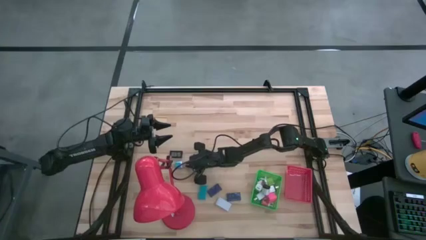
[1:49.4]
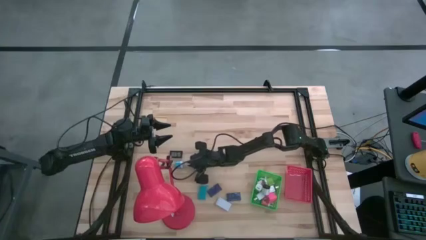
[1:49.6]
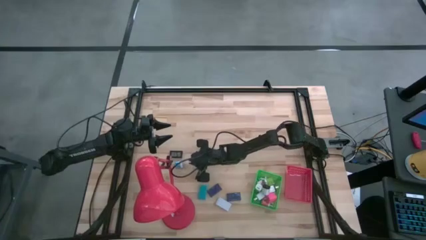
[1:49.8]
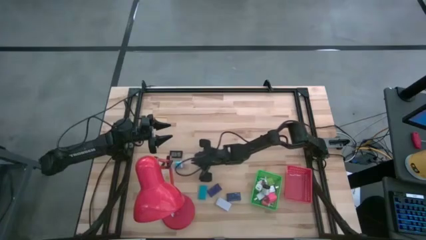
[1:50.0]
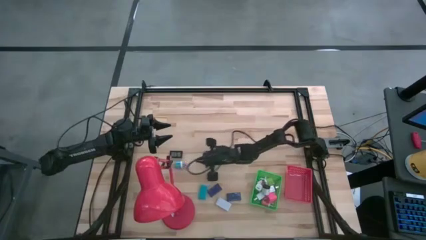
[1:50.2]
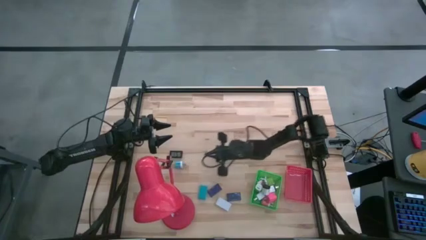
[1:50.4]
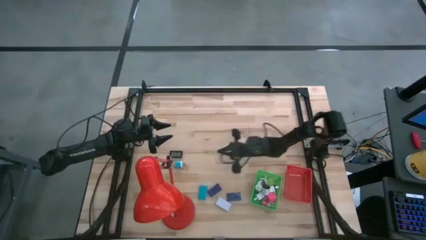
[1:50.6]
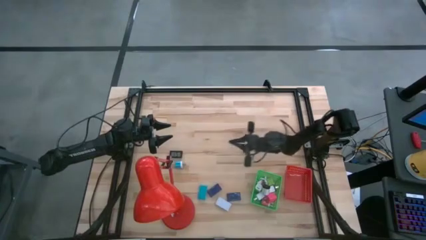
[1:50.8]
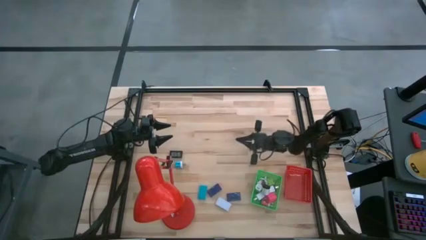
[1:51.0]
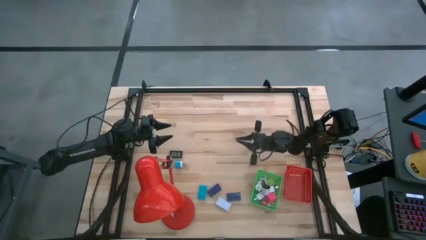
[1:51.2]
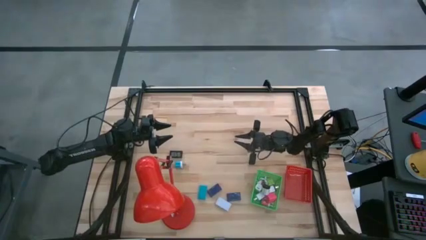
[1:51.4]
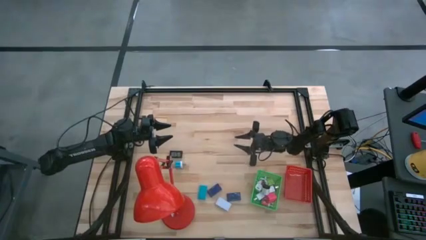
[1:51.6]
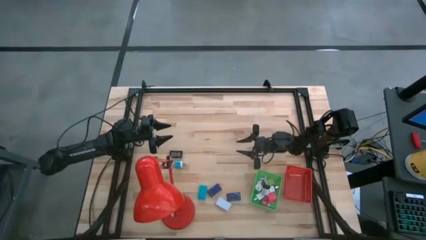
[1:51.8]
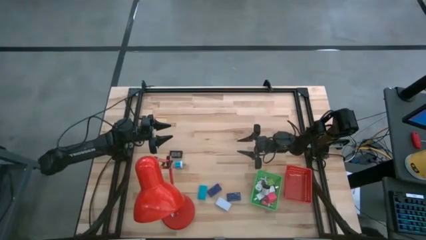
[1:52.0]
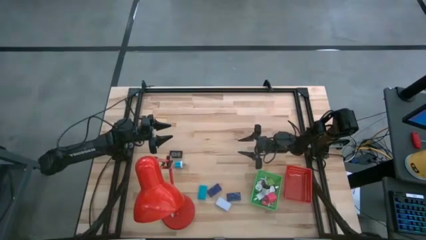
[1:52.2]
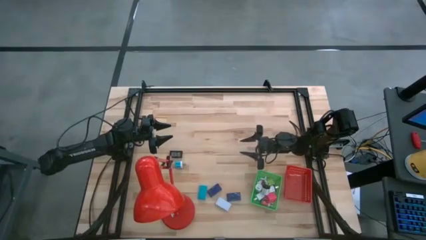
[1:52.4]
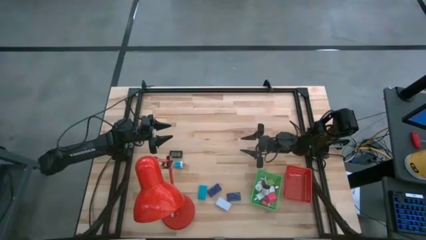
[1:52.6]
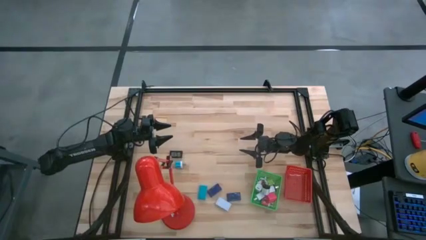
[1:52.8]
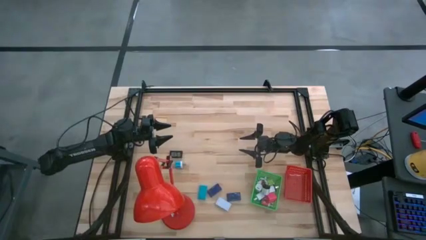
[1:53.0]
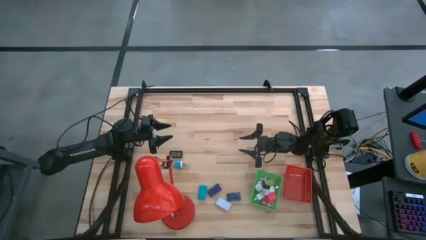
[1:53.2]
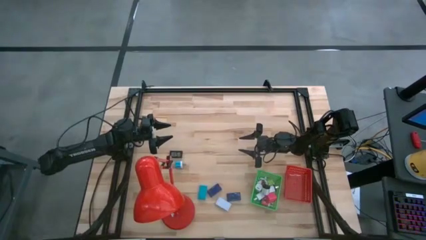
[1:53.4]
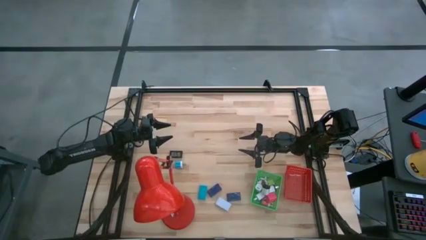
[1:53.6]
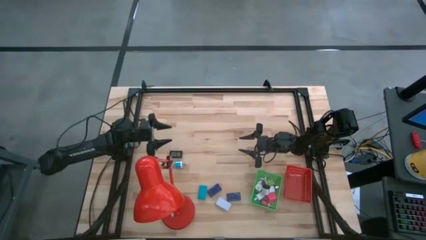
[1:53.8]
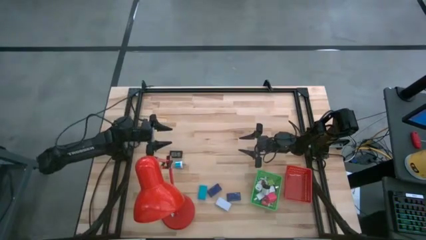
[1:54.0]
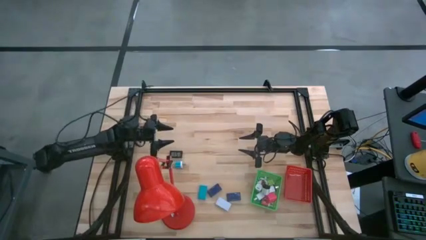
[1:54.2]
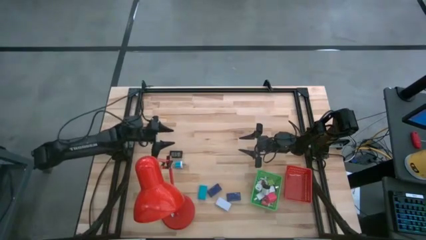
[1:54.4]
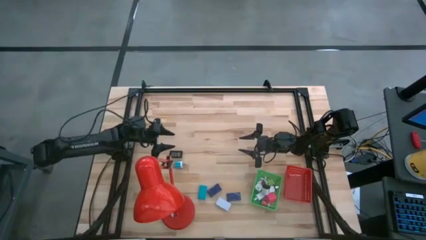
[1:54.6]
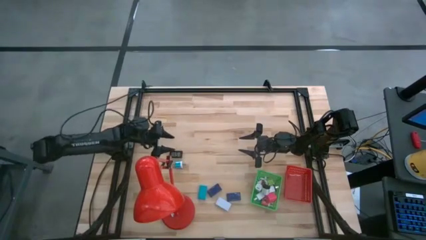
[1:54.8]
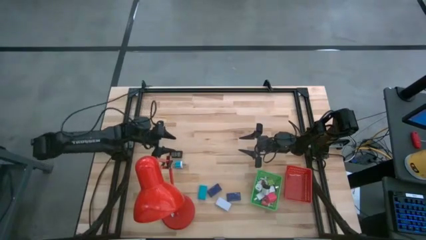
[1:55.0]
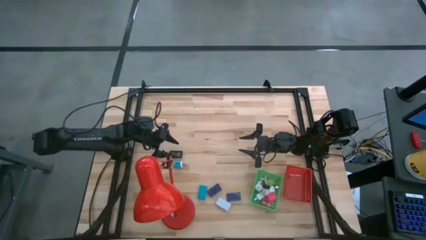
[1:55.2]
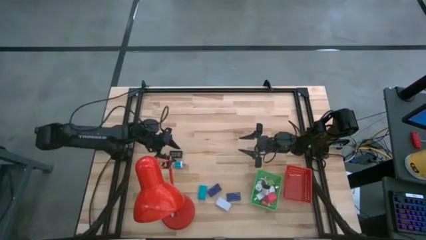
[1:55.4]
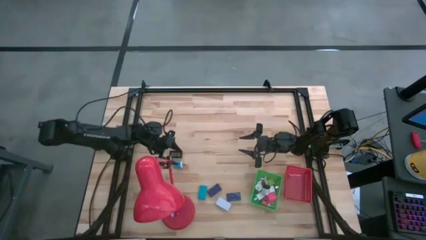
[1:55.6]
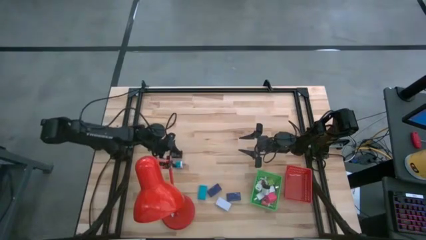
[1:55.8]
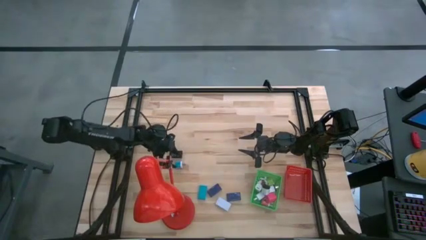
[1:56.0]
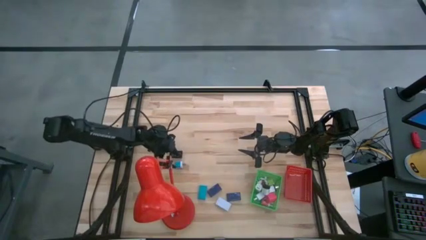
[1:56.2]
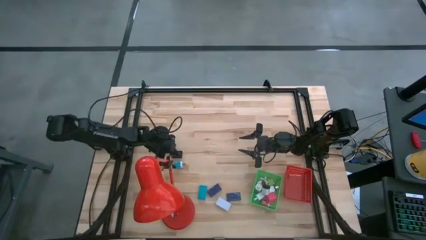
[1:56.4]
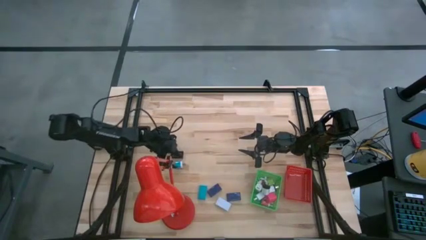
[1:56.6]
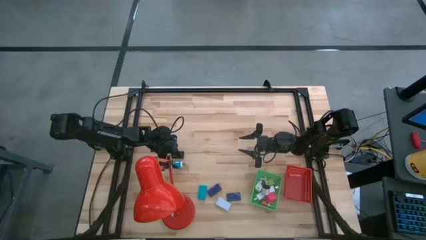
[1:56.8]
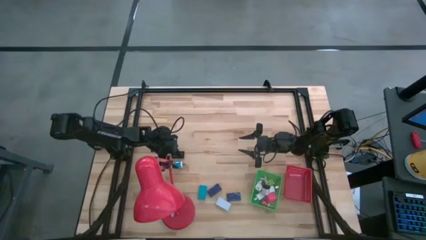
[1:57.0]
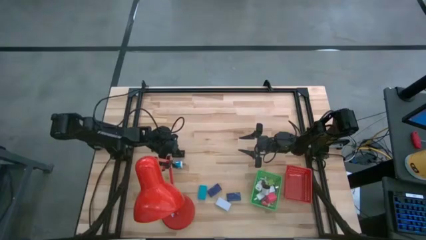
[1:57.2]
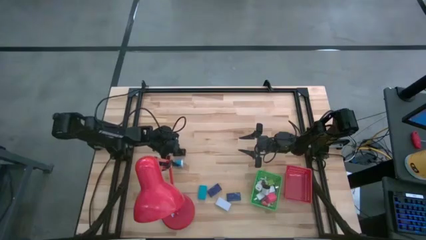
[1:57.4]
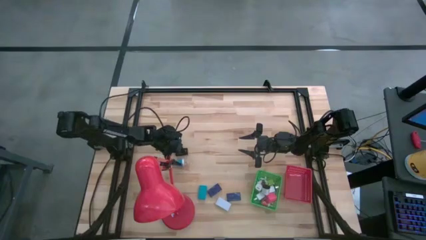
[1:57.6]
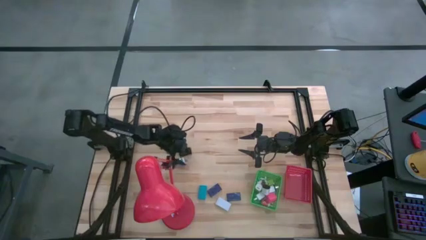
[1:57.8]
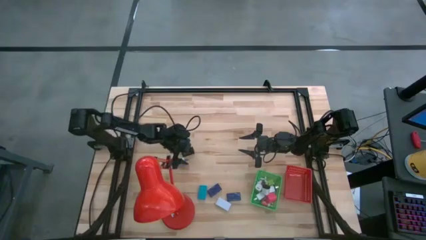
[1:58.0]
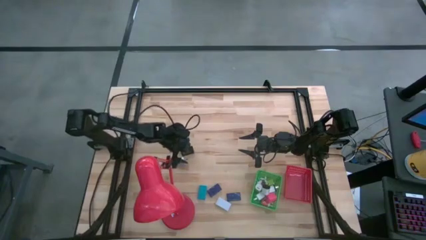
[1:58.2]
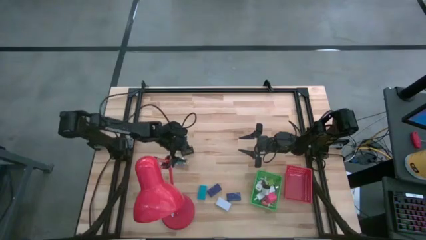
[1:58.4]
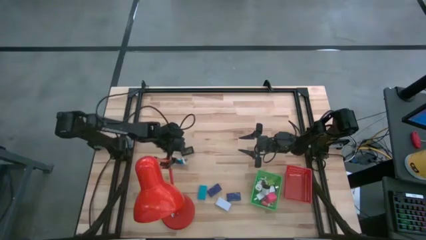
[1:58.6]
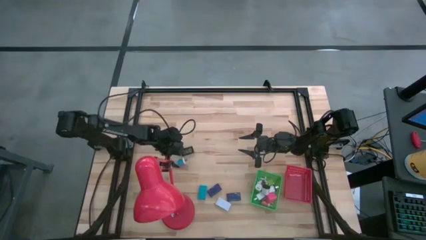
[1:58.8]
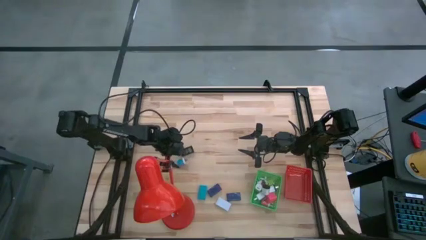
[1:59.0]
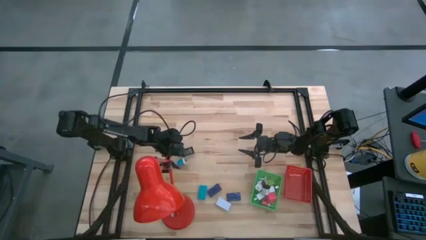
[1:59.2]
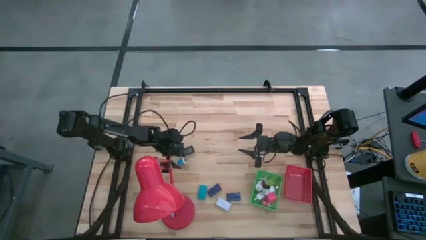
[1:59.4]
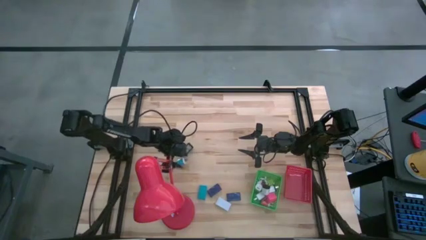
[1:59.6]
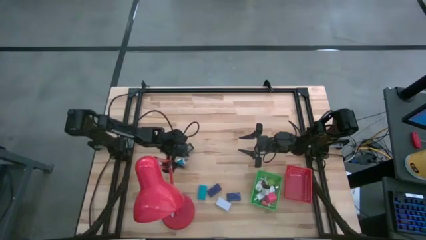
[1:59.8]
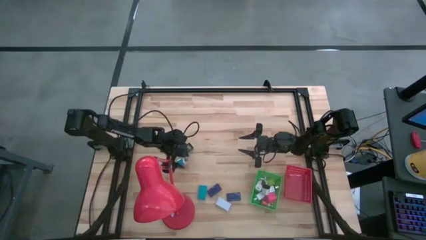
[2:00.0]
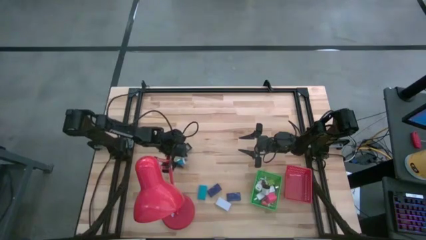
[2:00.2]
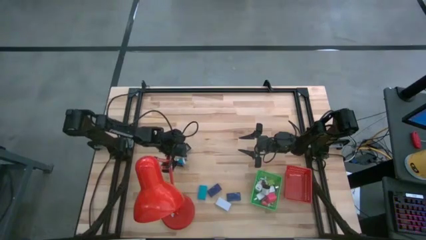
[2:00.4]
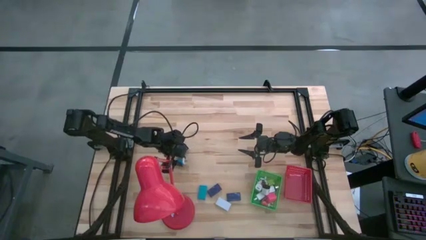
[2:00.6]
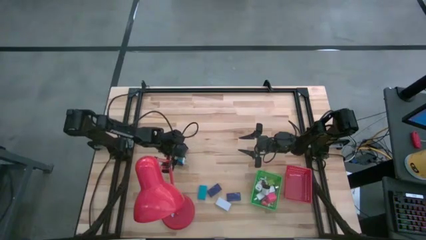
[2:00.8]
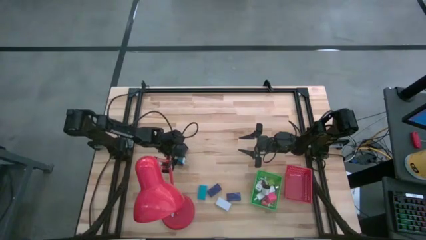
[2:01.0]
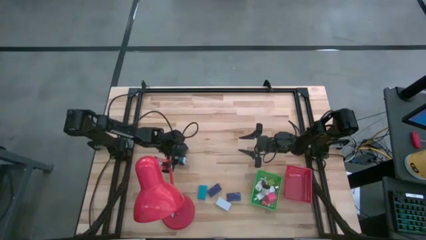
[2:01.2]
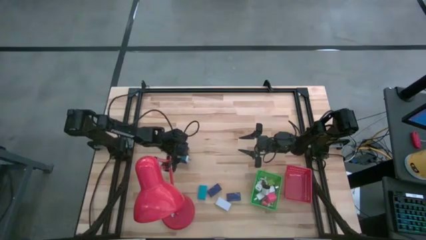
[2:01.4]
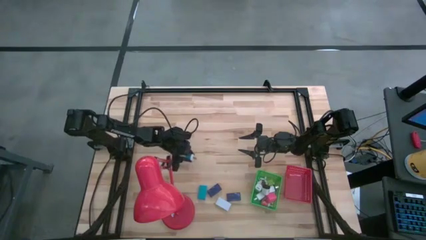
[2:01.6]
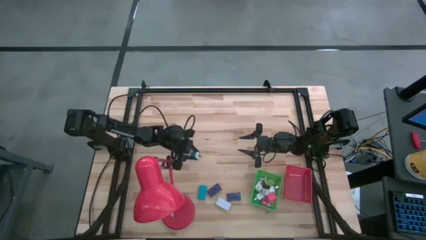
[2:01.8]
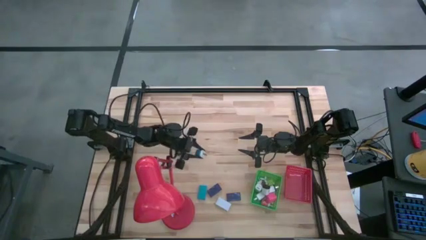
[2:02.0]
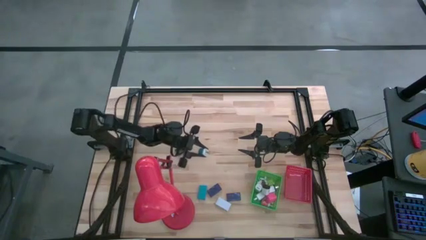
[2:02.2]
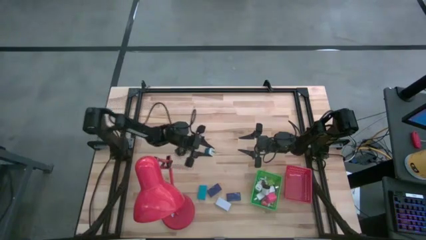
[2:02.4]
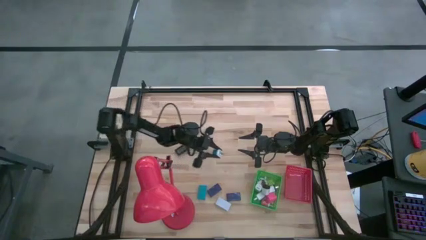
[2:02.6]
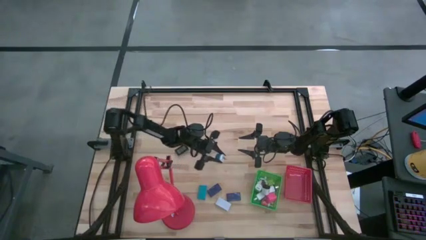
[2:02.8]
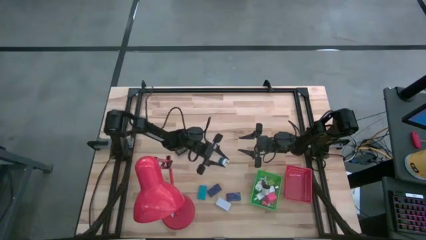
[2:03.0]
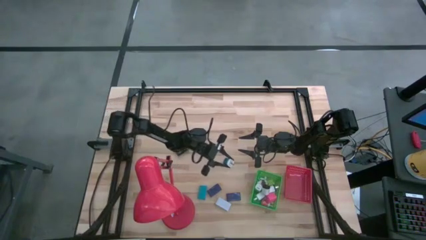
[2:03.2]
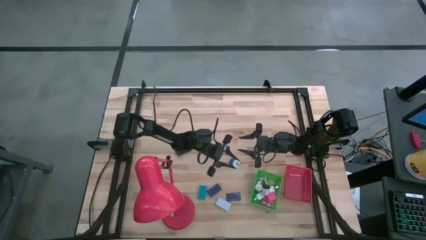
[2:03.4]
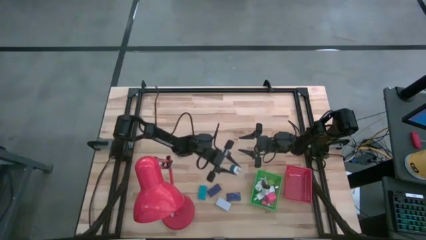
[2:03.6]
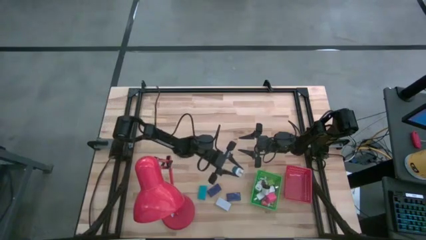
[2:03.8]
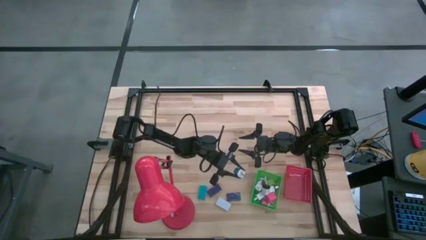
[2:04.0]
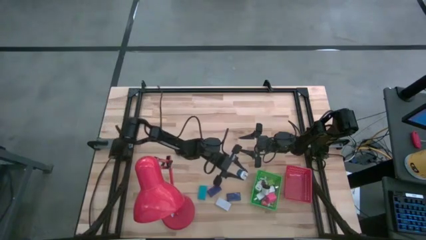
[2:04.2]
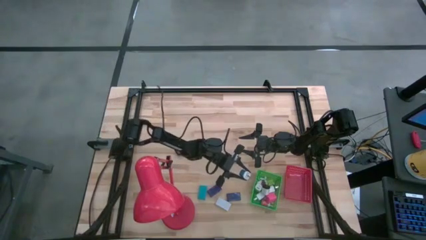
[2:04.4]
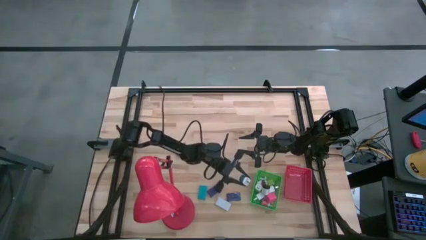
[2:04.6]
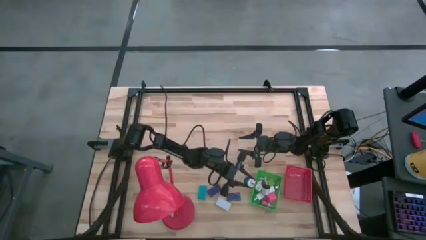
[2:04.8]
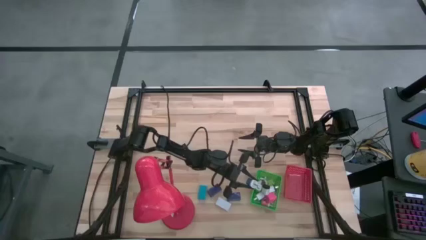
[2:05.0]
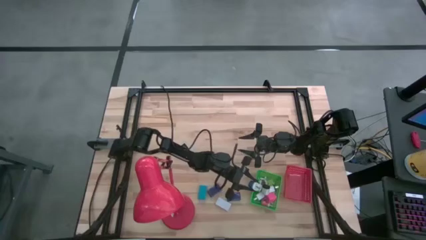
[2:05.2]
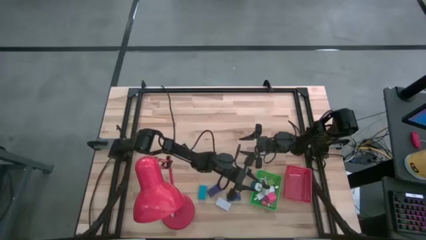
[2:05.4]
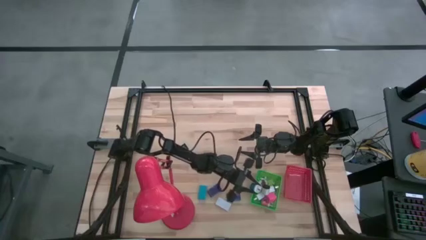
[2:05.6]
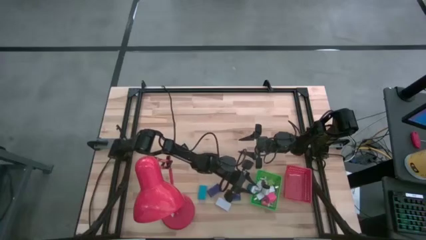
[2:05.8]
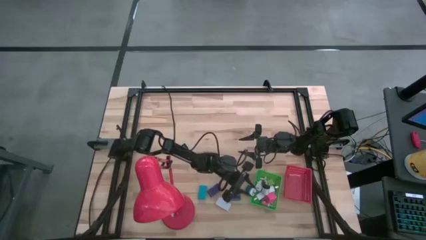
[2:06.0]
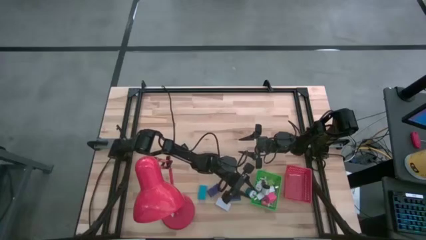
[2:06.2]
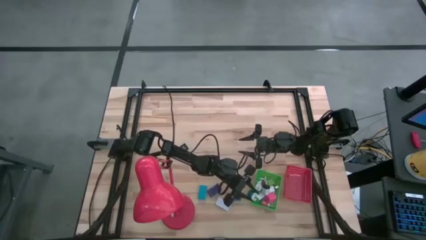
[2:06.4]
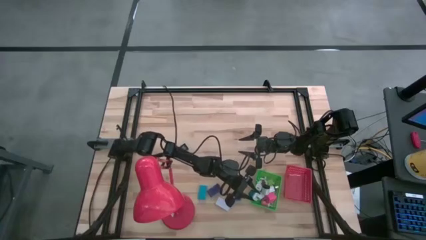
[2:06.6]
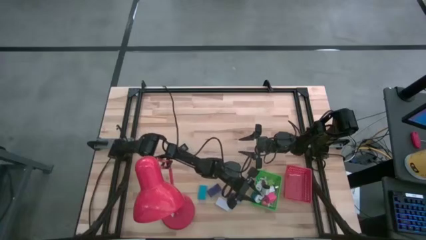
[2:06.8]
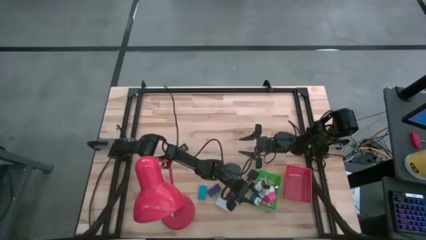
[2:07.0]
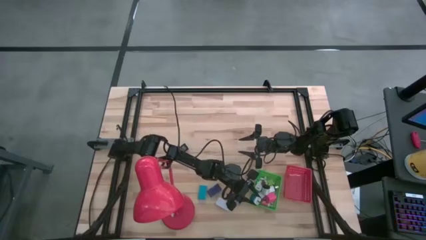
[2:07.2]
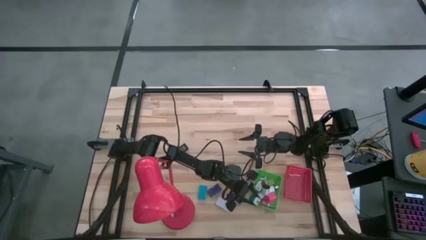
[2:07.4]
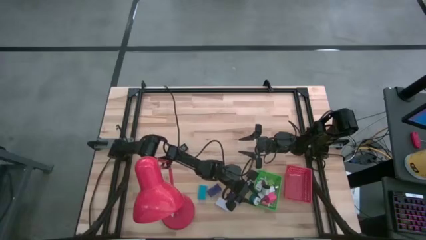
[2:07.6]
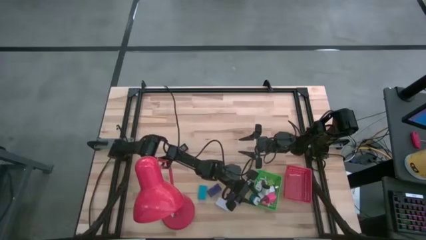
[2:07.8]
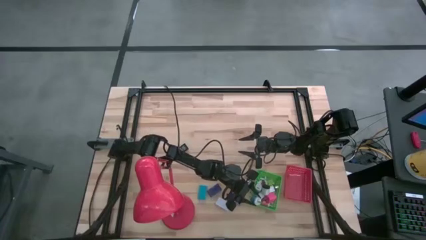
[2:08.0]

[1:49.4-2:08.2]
Task: Pick & Place Office items
Put the blue charger adapter into the green basket
